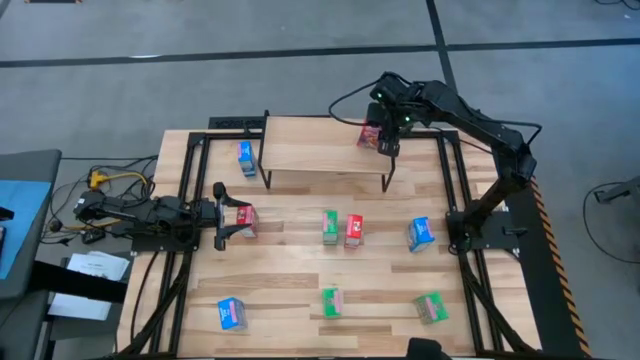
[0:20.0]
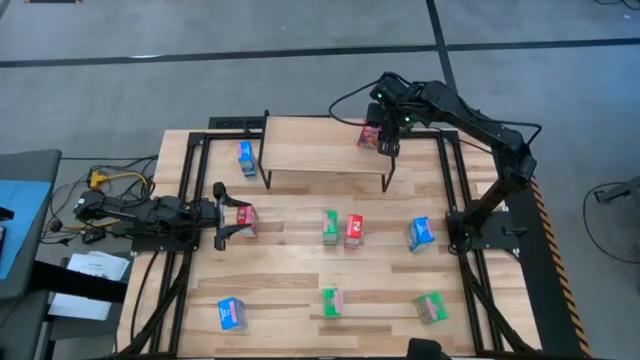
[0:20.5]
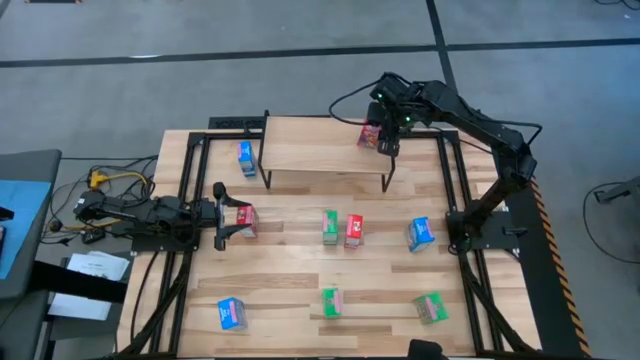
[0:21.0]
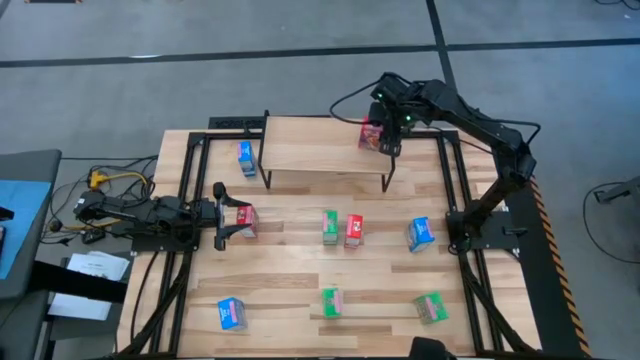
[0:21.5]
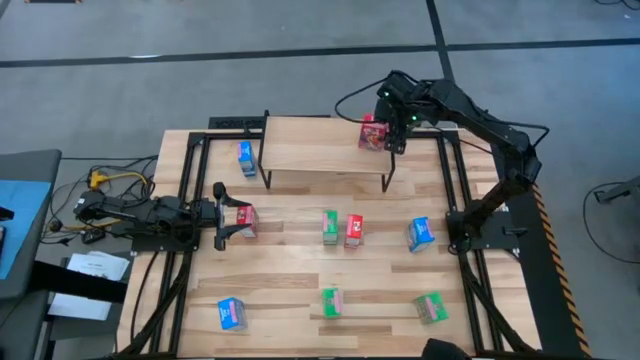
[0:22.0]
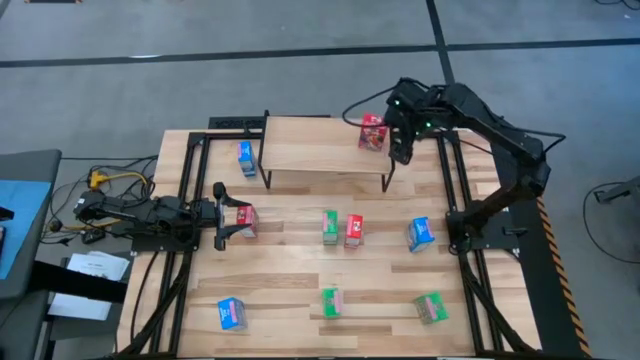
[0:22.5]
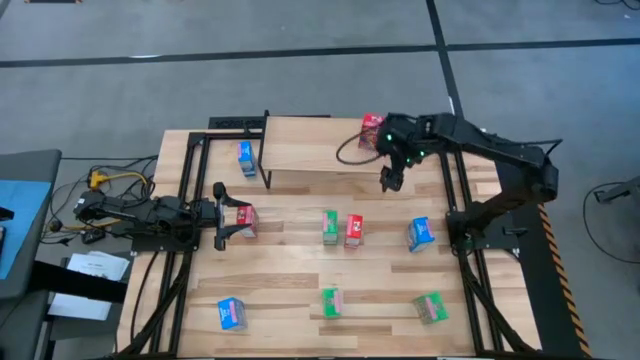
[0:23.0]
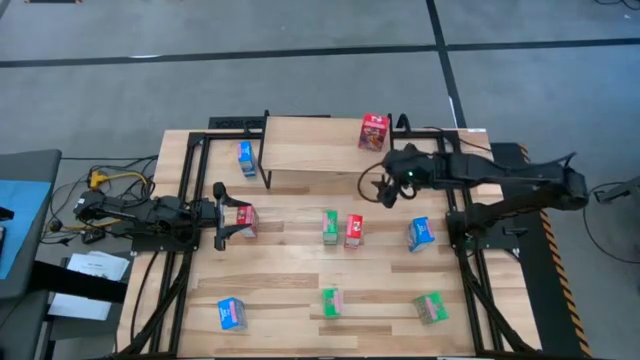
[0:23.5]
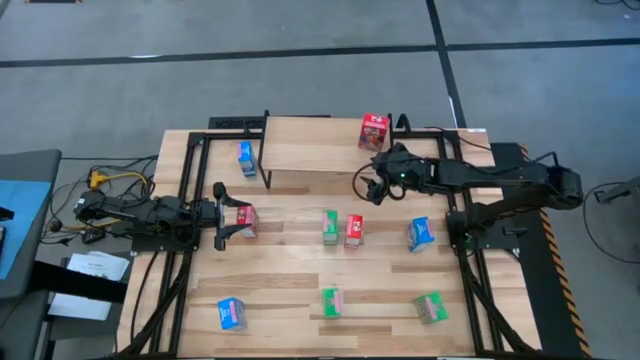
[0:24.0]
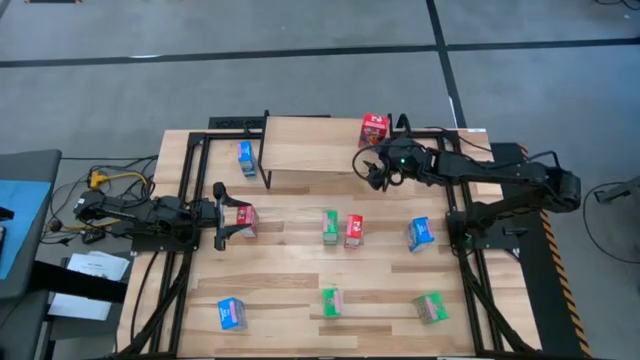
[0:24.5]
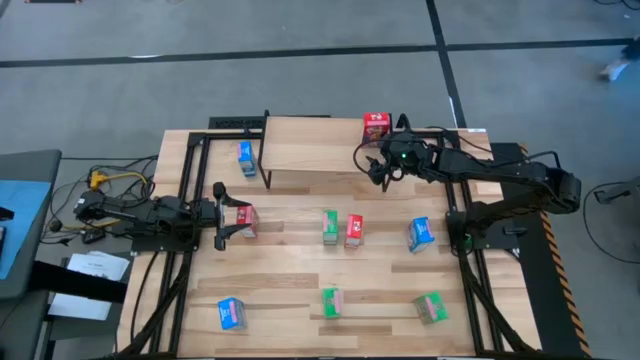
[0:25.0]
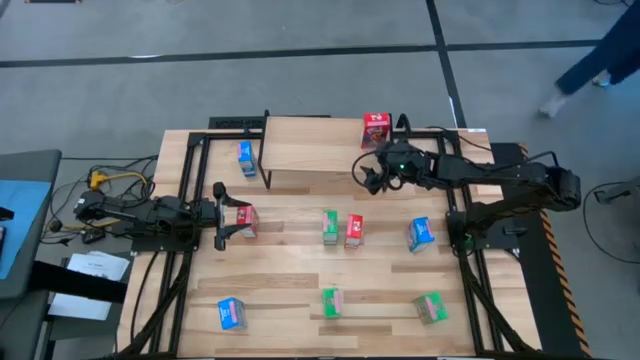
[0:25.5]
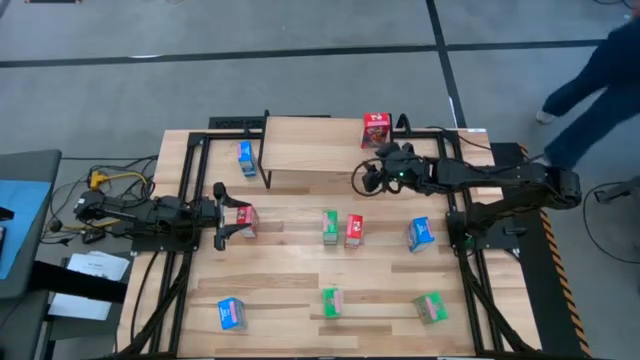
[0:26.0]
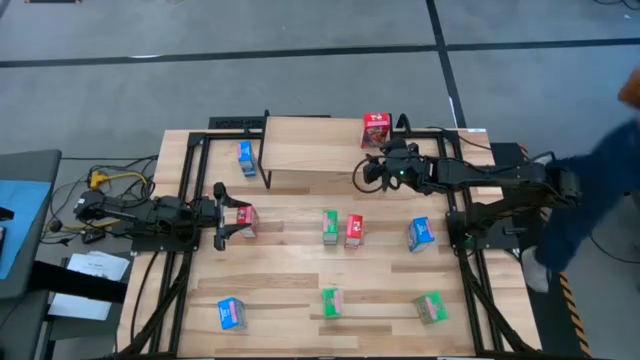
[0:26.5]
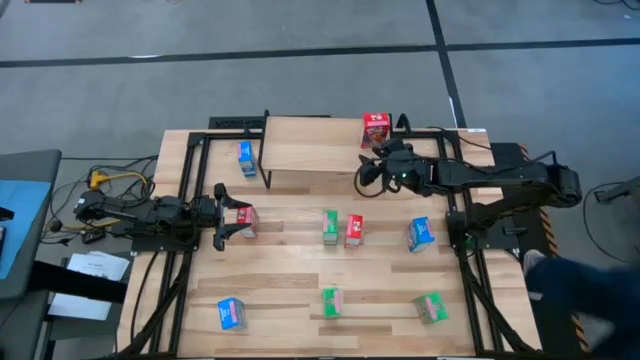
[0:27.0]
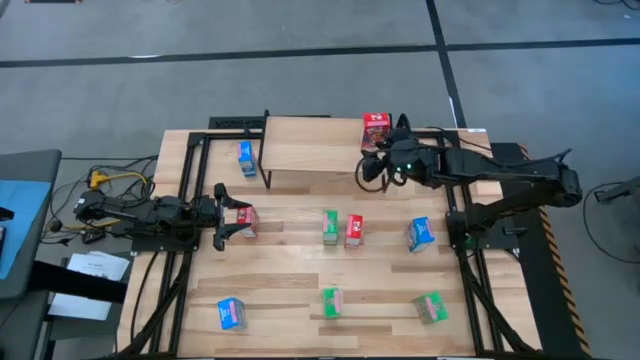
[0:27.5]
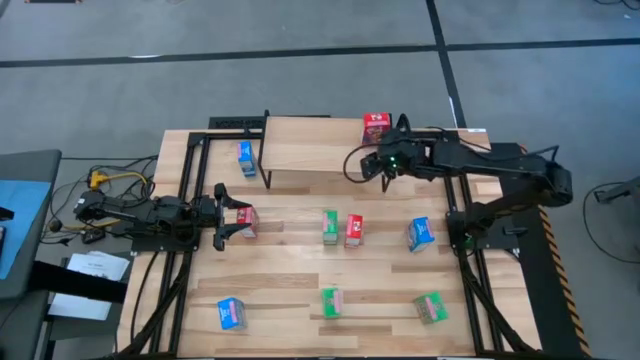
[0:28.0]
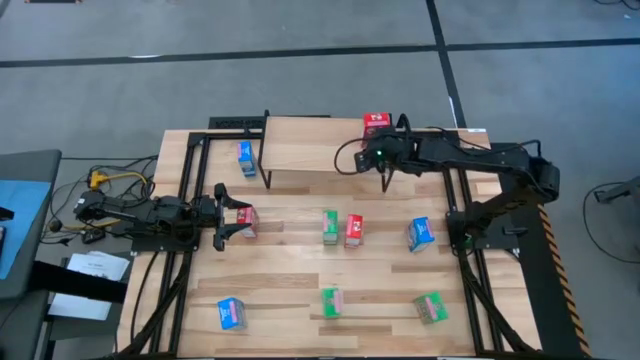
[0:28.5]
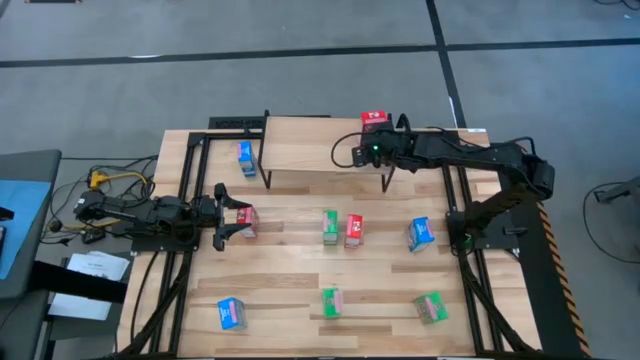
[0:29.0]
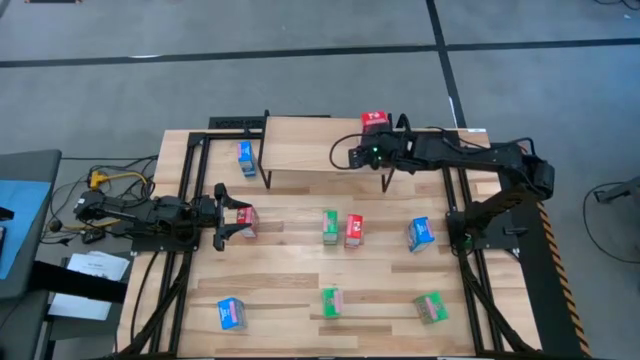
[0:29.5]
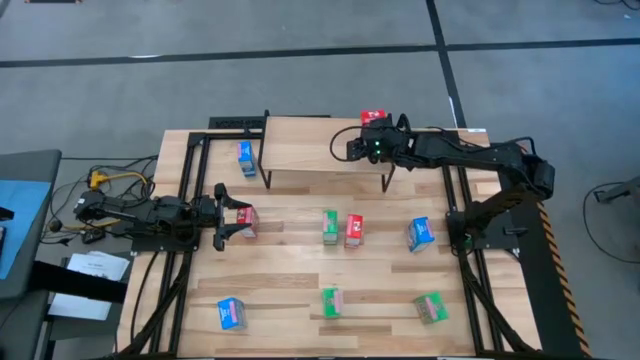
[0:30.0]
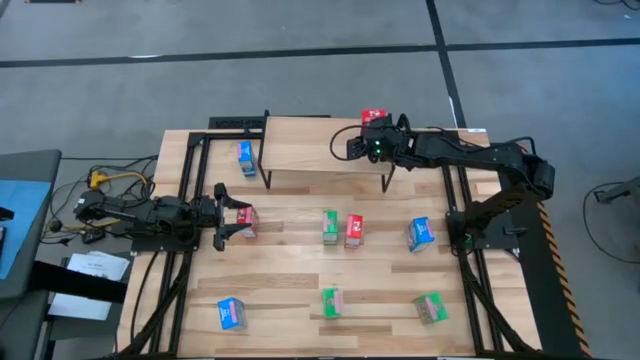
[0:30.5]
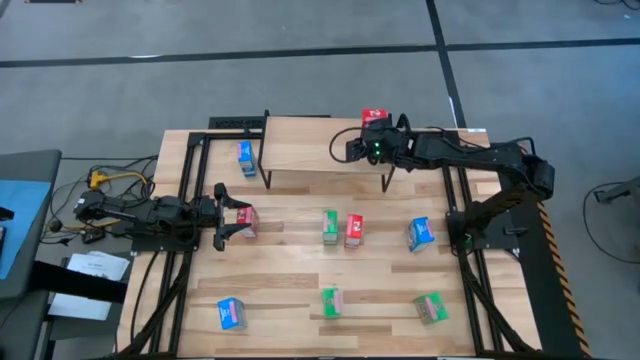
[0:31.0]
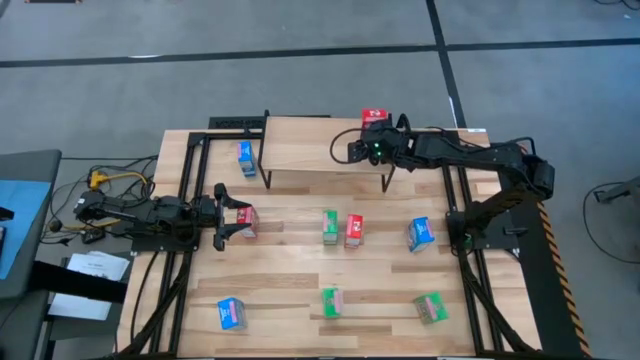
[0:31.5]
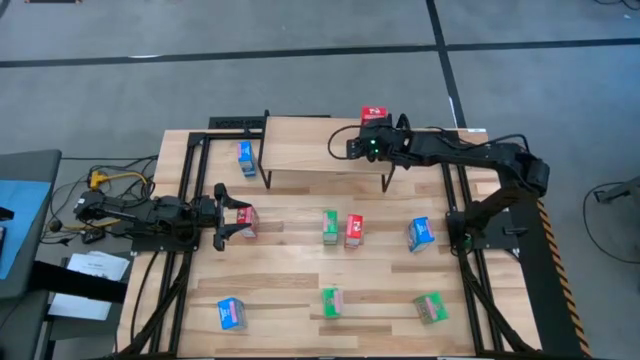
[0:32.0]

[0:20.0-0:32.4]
Task: Stack cereal on shelf
Put the top red cereal box on the shelf

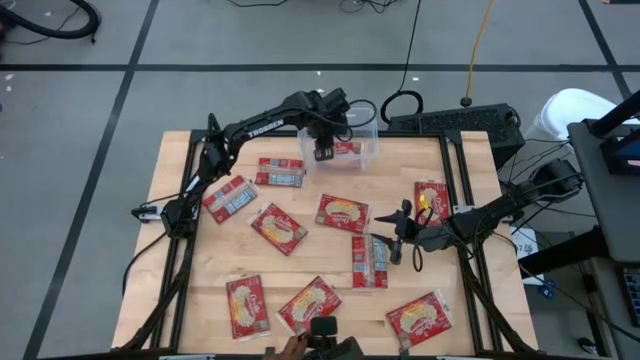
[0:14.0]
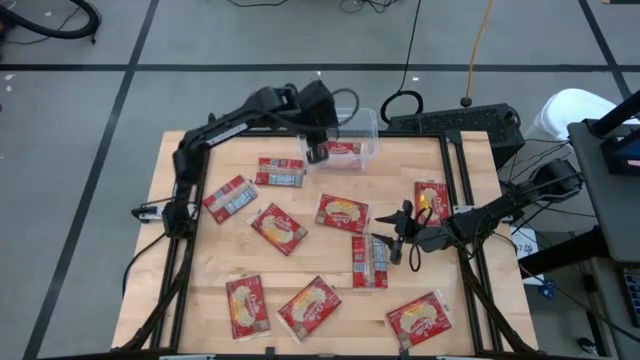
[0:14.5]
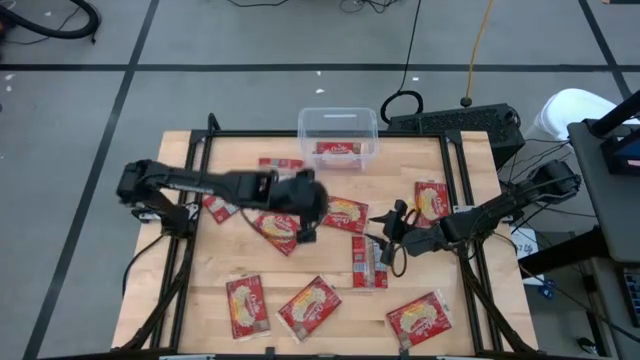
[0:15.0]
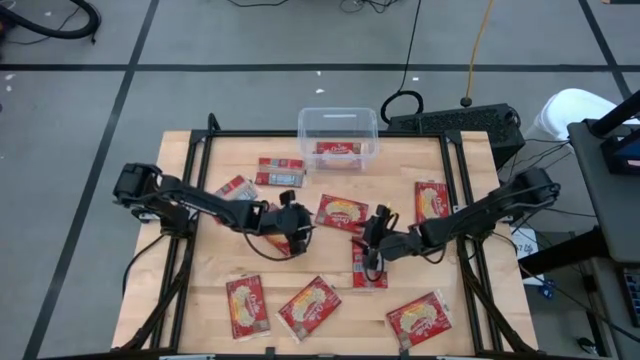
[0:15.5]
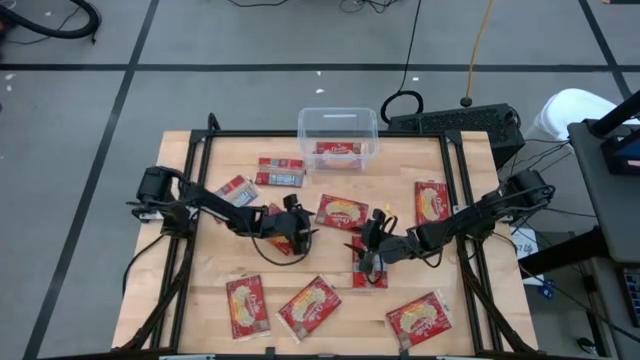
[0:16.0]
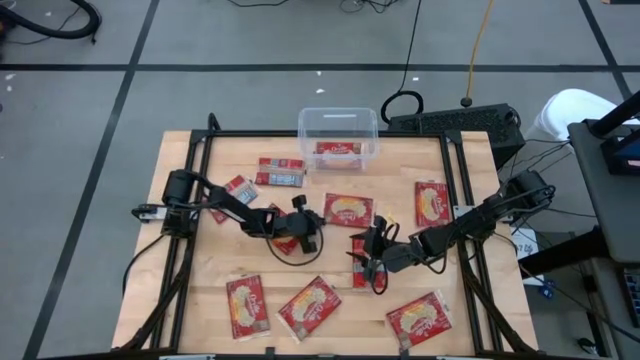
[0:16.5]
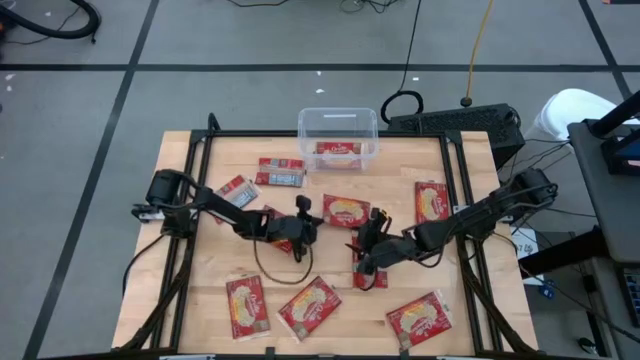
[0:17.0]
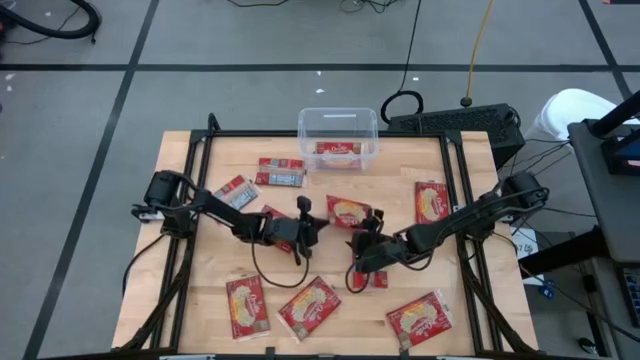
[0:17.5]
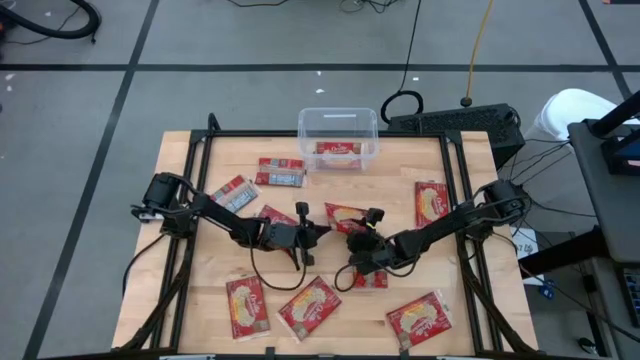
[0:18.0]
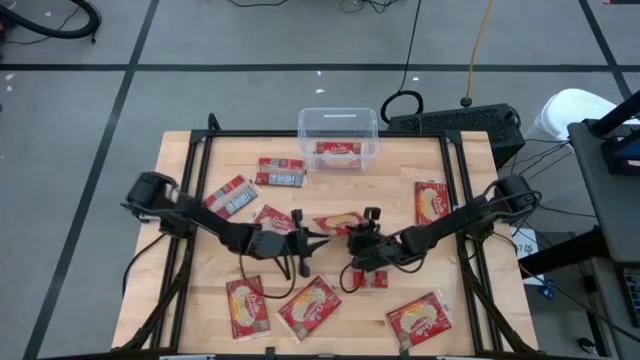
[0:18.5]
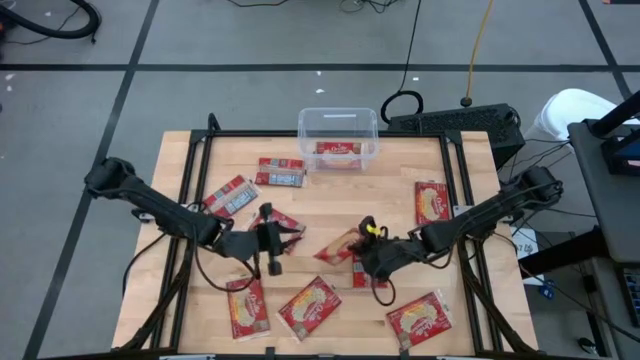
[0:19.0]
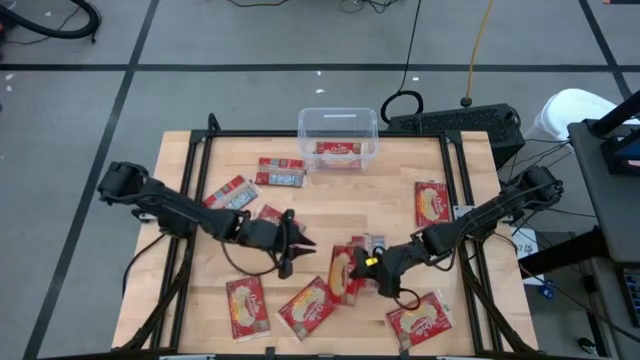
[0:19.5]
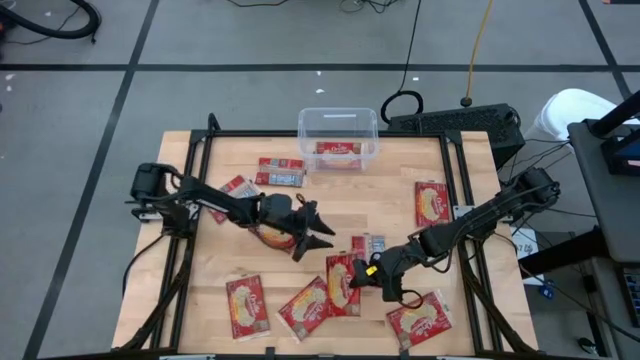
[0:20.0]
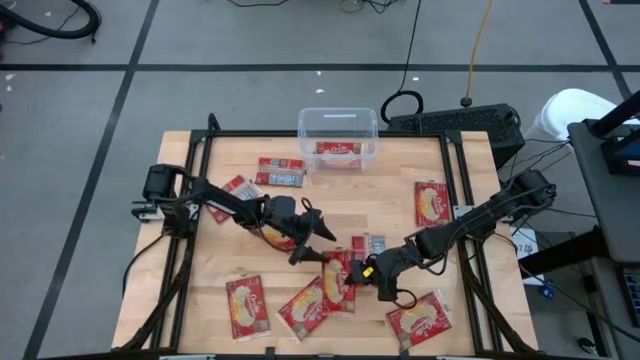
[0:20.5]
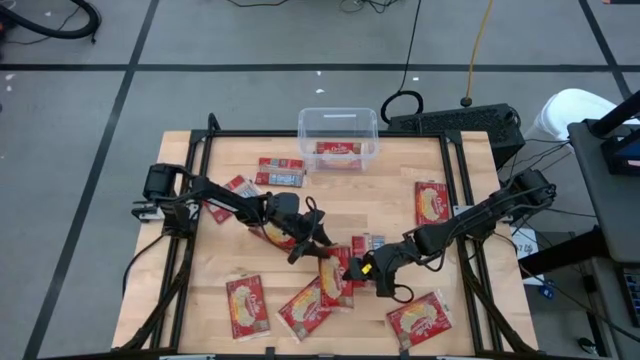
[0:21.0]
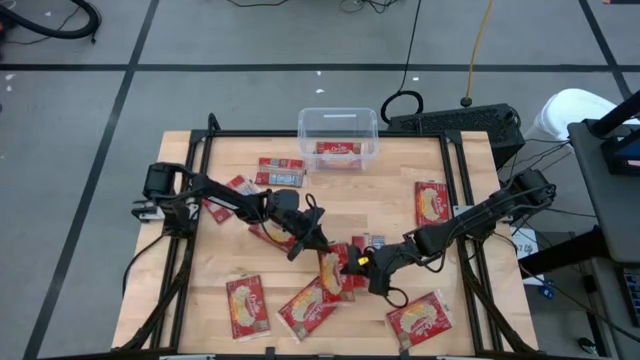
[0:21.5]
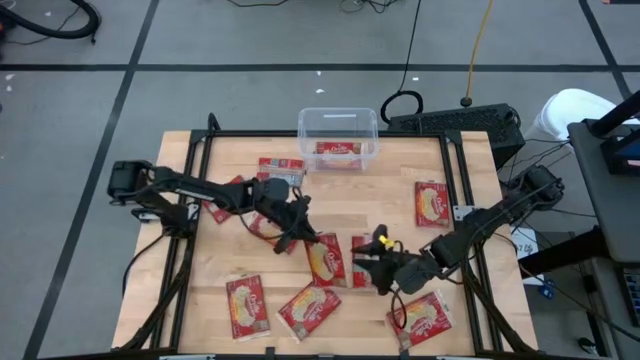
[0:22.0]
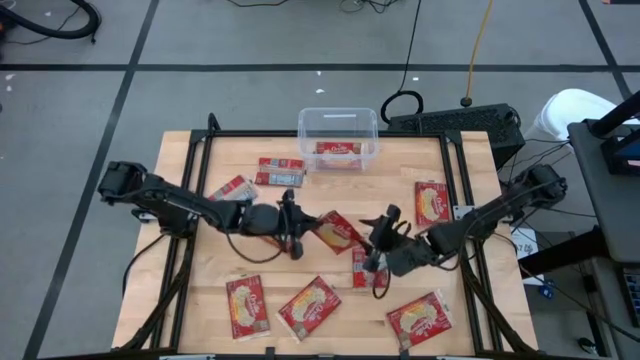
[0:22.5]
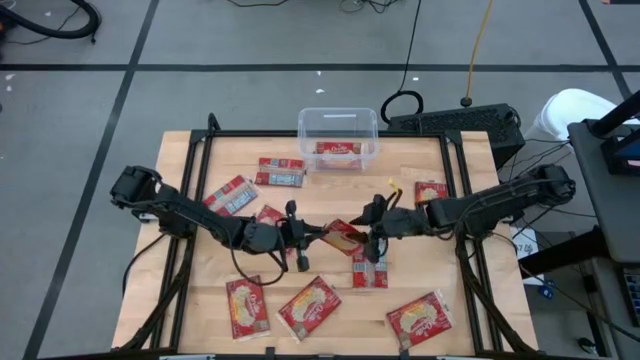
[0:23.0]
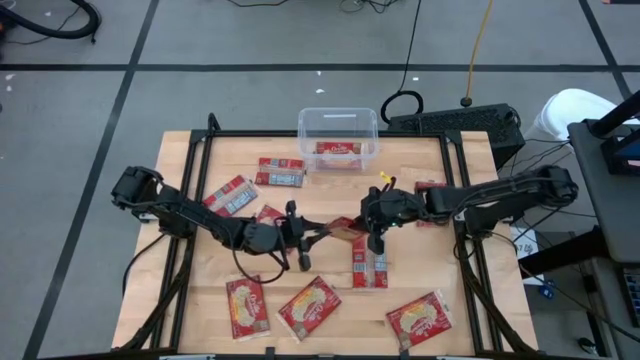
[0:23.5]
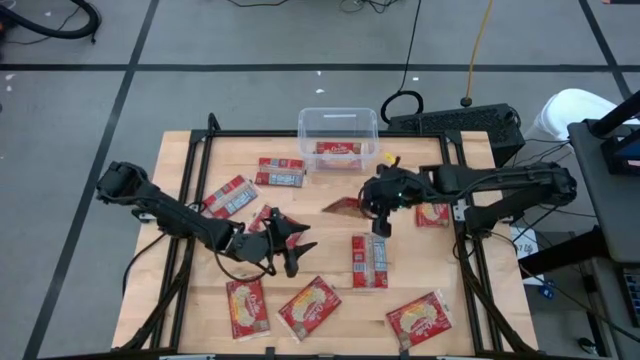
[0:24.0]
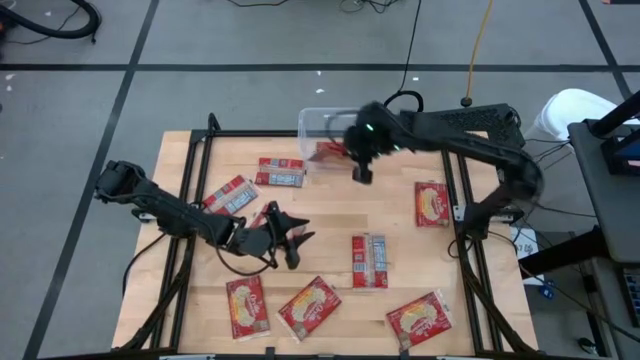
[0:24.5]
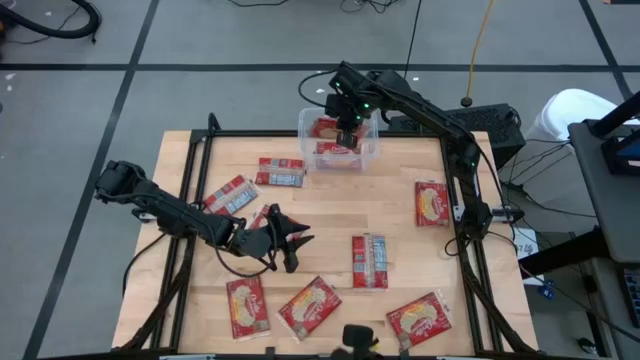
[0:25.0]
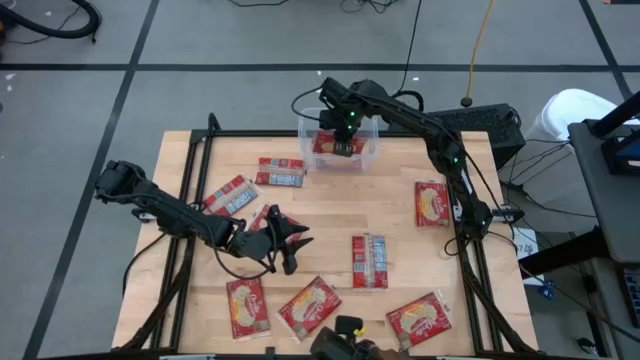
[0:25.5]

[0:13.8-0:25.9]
Task: Sort popcorn bags into baskets
Put the popcorn bags into the transparent bin
